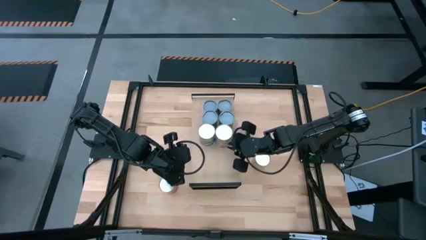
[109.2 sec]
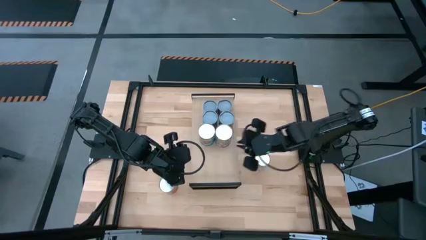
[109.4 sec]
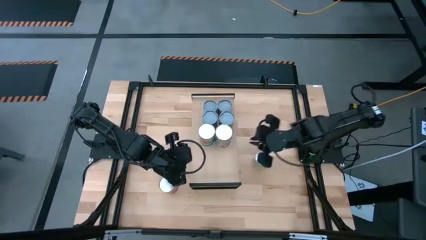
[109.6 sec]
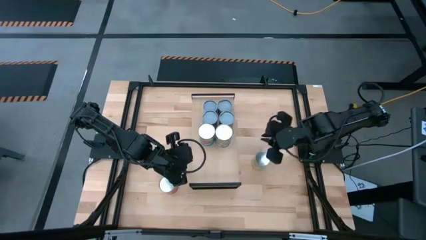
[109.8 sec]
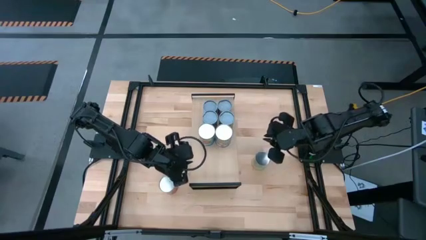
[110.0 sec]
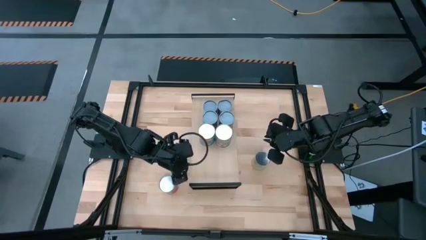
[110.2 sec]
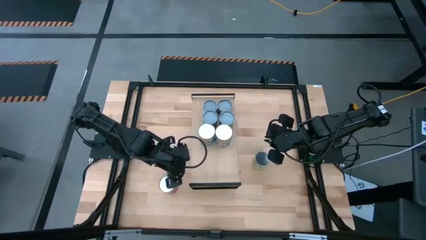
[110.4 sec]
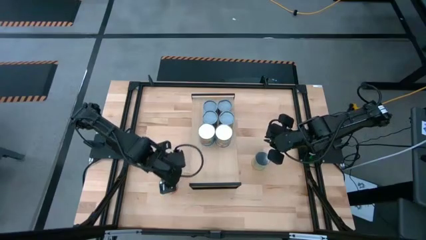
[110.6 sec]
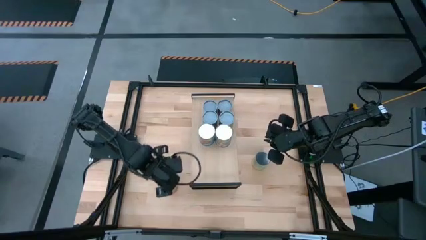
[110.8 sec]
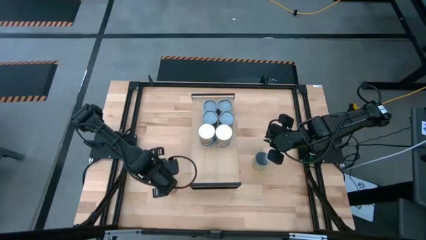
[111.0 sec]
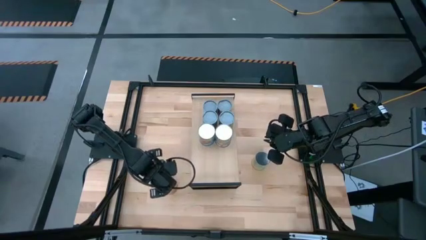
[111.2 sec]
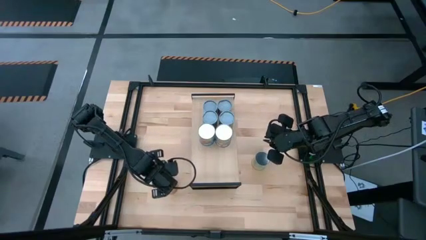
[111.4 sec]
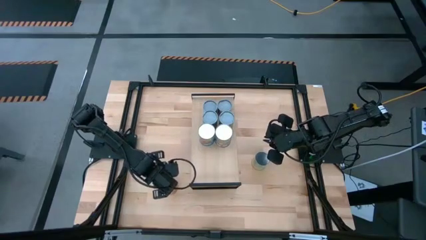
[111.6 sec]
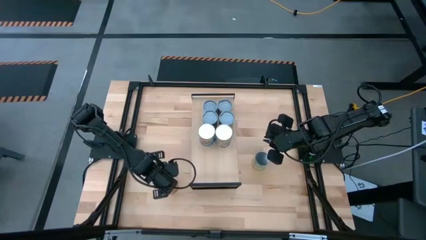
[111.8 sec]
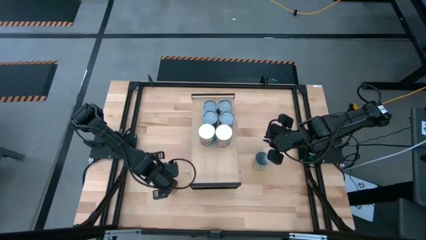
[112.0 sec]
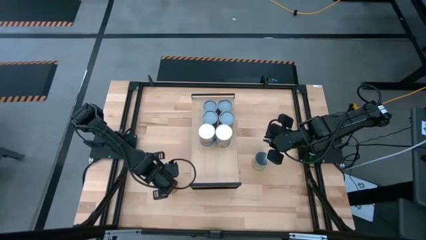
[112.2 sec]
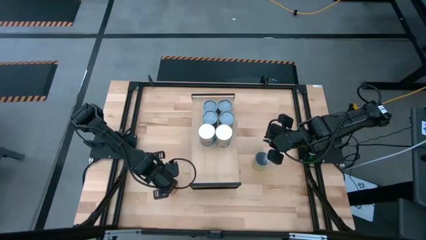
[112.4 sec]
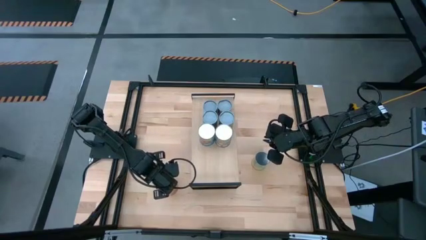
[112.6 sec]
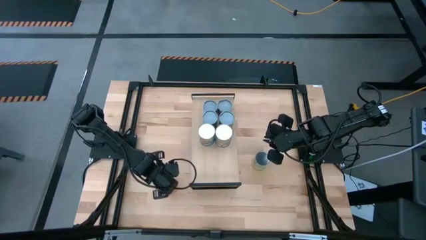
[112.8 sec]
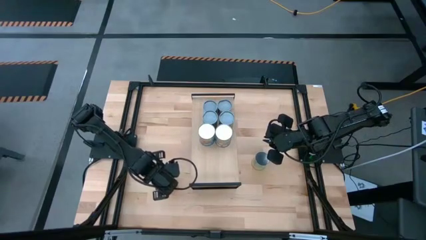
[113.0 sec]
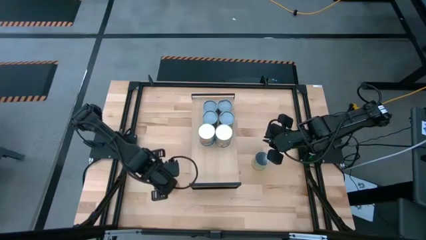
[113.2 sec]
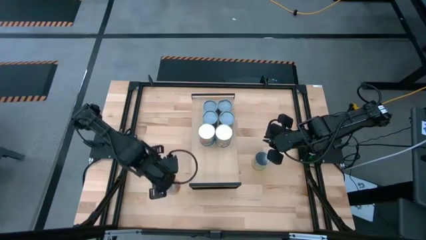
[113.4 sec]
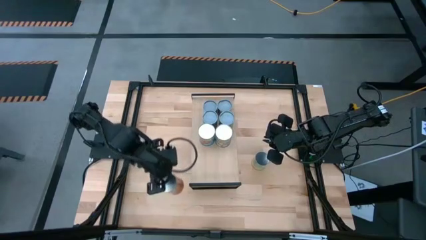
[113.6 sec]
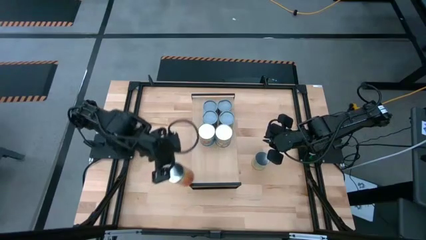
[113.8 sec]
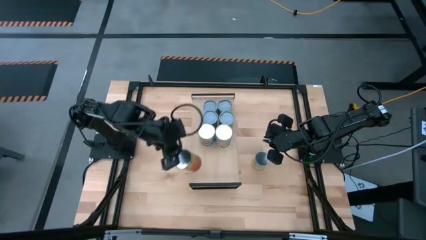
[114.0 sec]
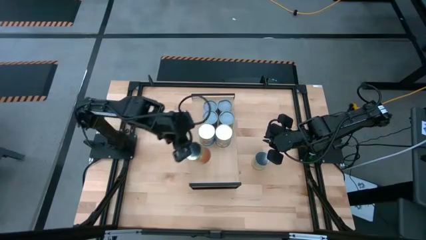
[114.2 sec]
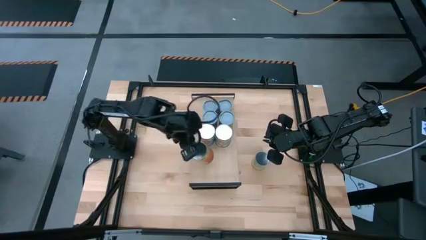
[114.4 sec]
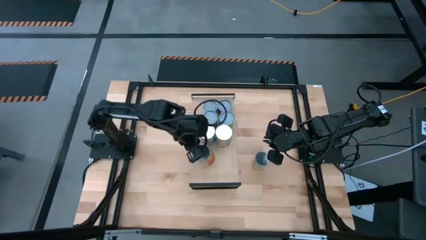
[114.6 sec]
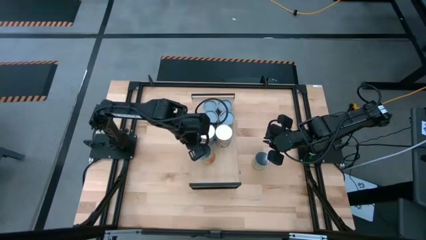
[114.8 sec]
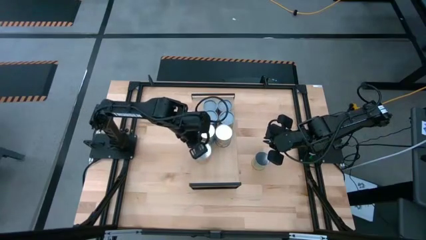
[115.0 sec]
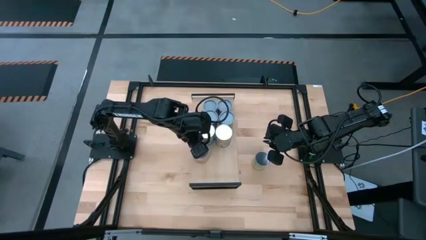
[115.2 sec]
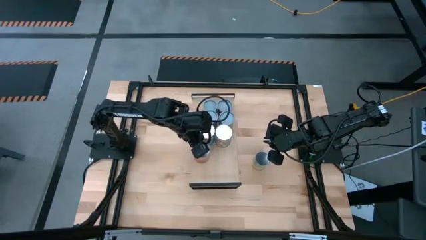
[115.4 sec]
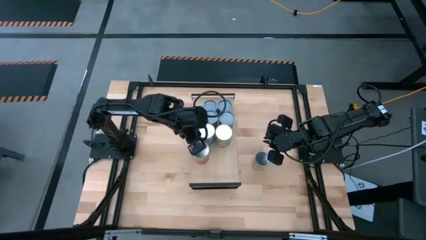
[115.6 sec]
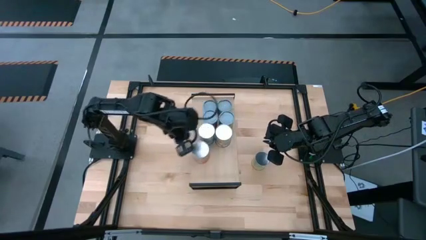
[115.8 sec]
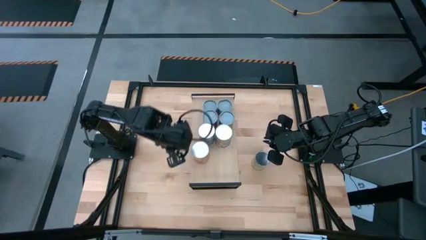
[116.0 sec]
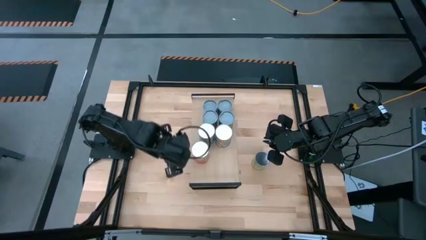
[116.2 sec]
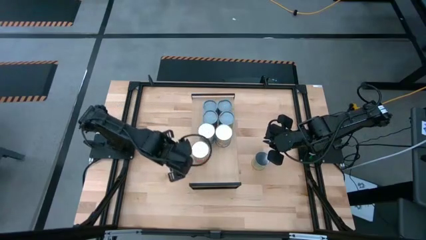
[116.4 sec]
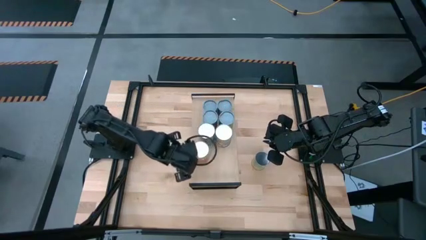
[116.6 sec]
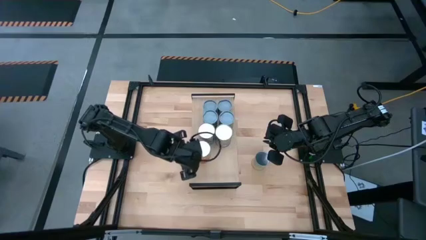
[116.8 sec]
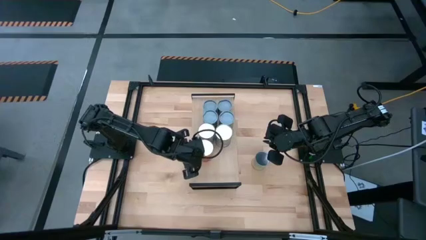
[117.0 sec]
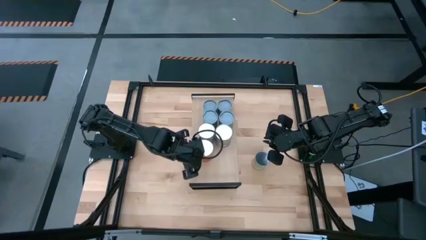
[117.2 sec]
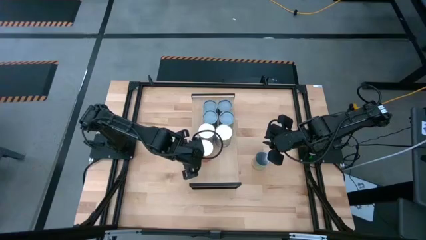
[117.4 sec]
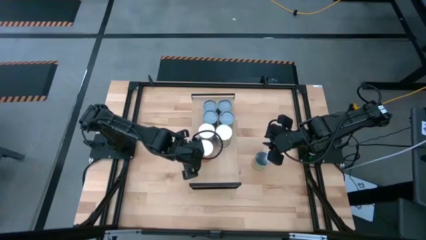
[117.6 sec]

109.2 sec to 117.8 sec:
Task: Pick and place cans onto a shelf
Put the canned pineapple on the shelf

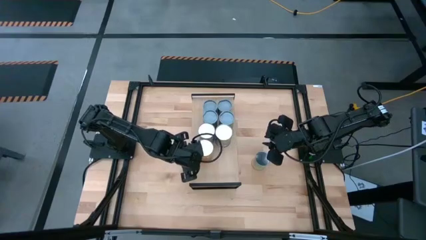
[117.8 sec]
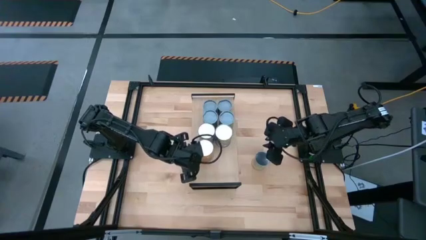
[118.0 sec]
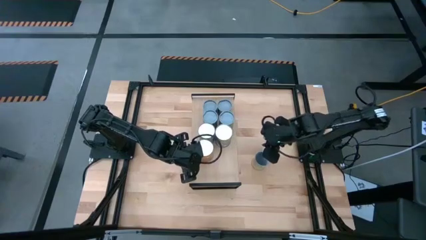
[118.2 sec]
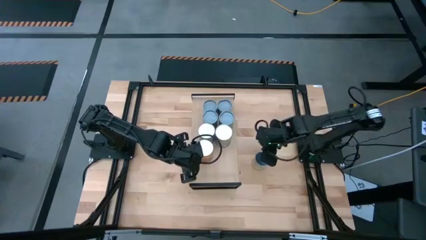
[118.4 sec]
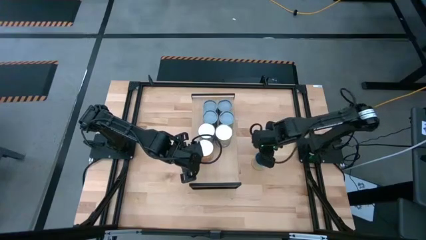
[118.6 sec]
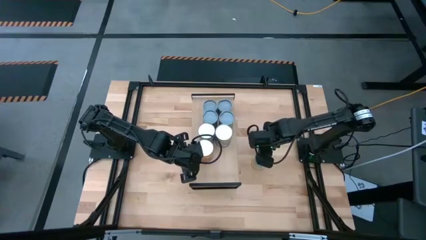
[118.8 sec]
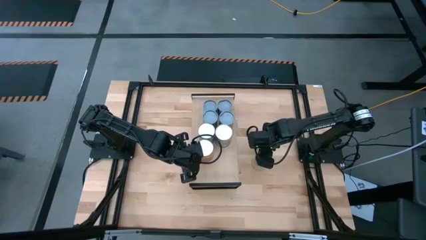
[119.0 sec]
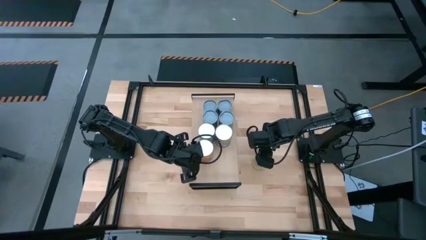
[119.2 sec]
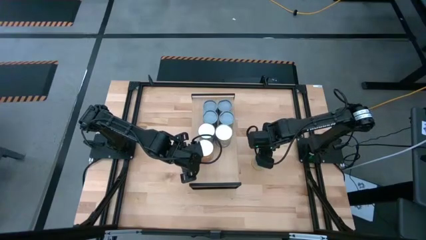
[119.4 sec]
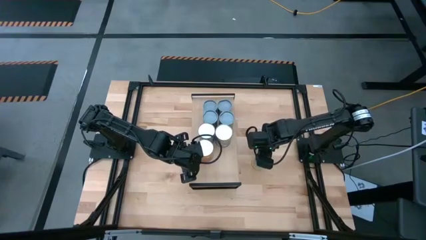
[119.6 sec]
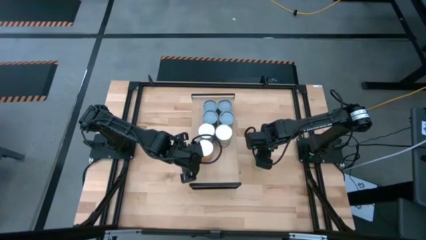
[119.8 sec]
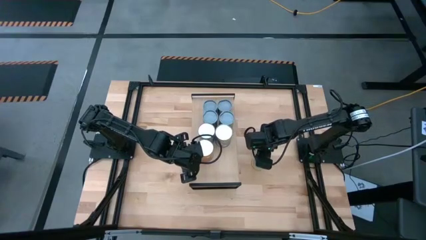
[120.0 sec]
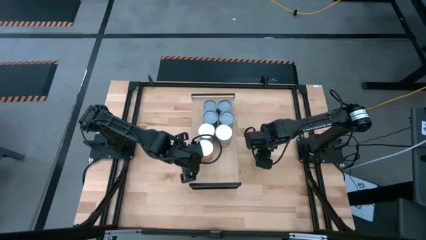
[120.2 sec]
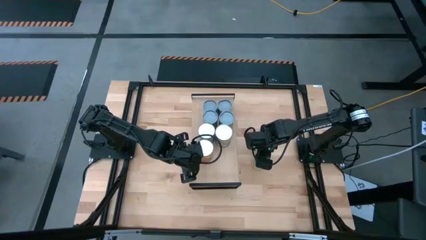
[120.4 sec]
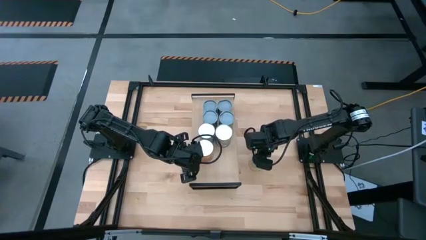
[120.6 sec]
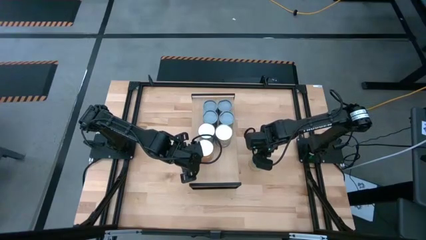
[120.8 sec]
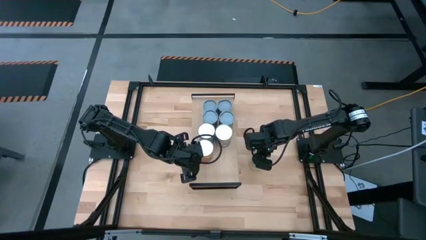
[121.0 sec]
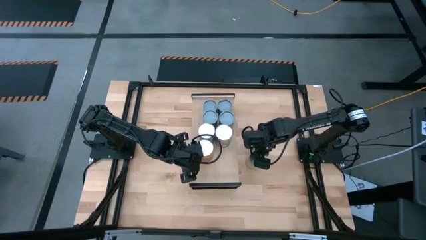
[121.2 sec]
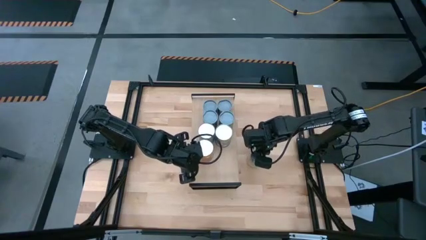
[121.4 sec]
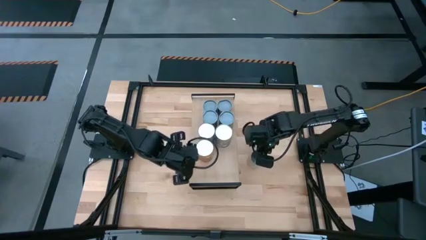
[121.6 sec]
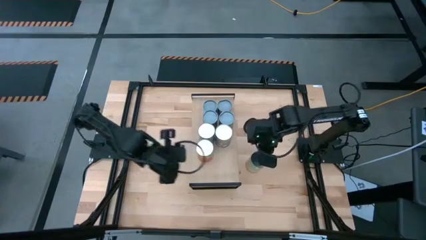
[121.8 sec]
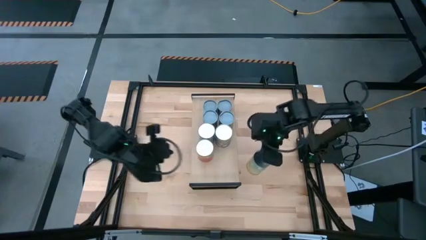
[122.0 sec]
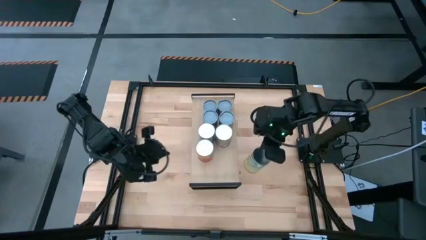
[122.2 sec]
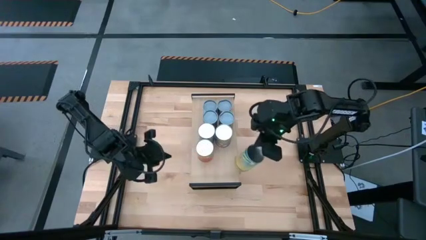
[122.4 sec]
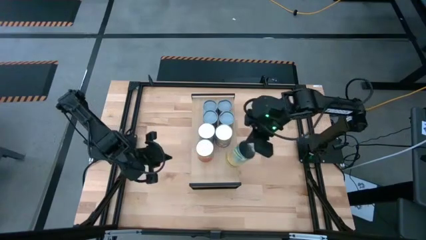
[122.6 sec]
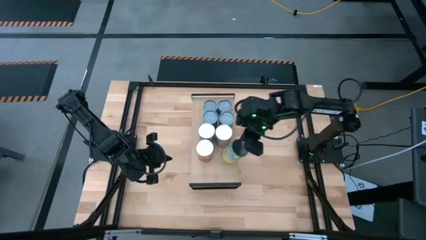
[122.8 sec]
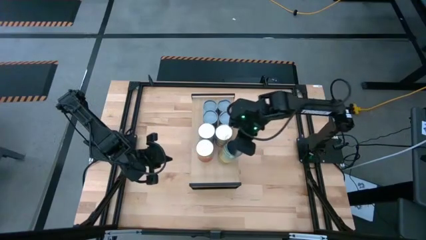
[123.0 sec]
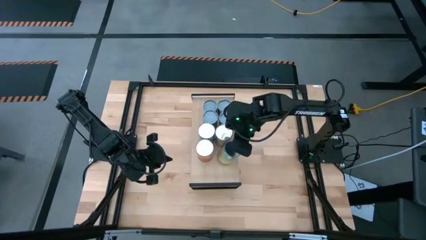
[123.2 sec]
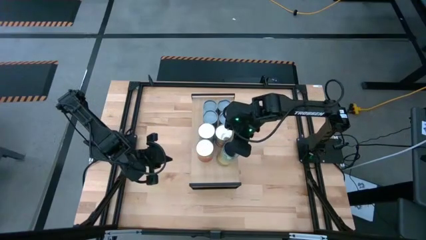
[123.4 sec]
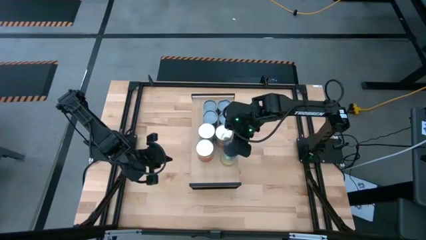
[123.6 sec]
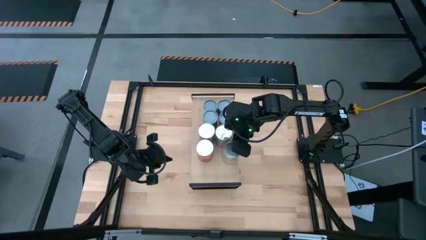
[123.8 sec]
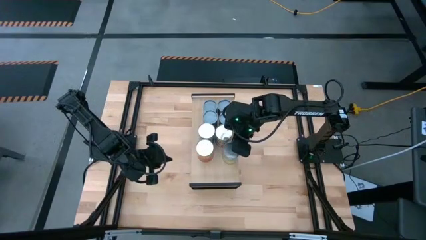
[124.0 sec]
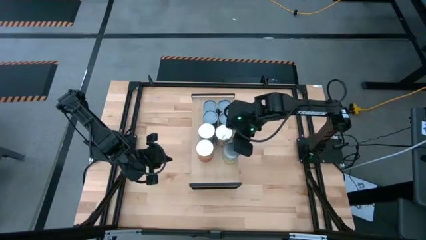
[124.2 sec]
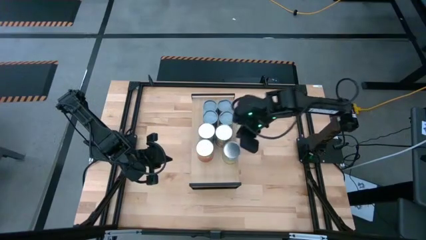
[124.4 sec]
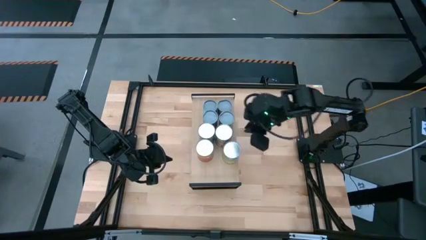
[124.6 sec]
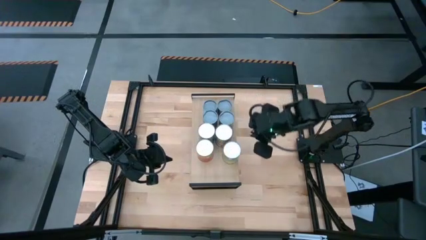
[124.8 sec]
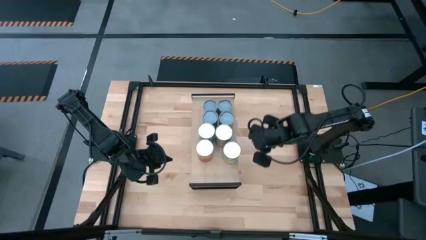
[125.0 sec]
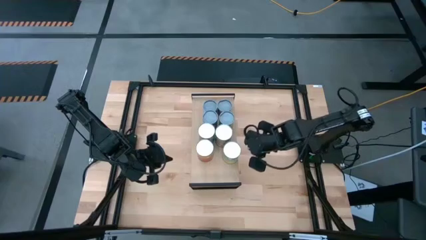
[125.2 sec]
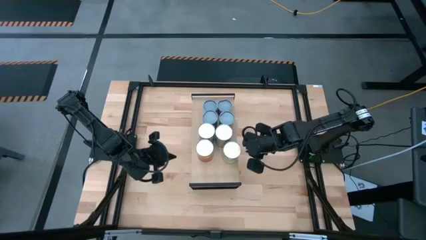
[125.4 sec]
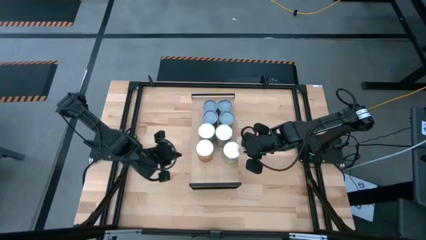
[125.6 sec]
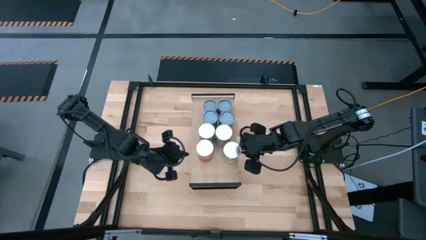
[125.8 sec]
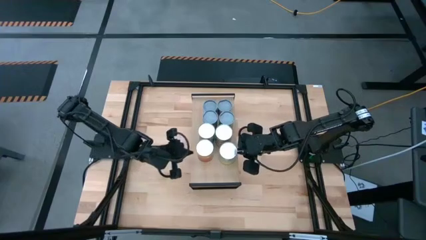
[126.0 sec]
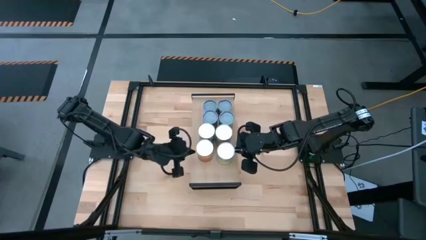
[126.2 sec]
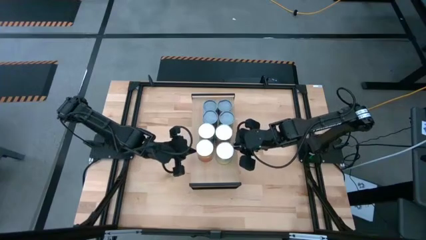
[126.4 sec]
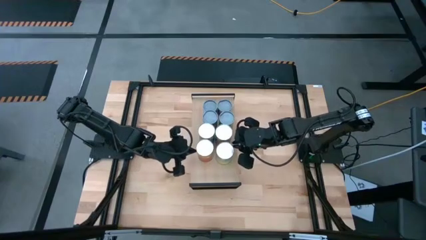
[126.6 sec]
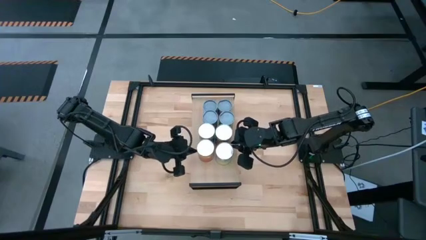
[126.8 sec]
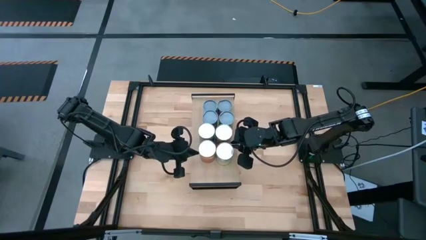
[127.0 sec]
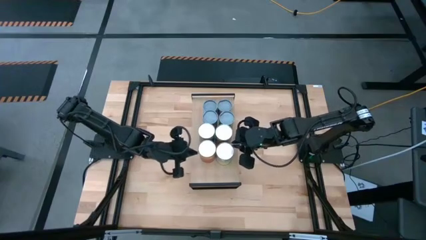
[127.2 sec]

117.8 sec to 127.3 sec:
Put the canned carrots on the shelf
